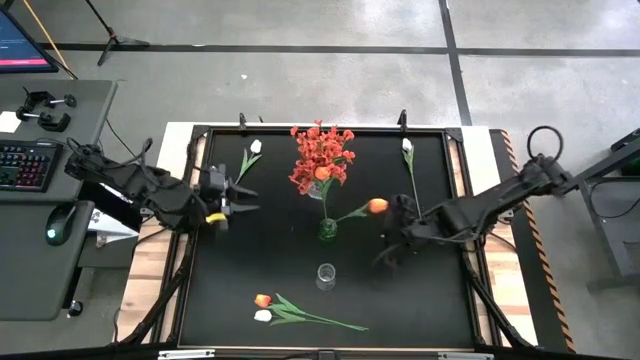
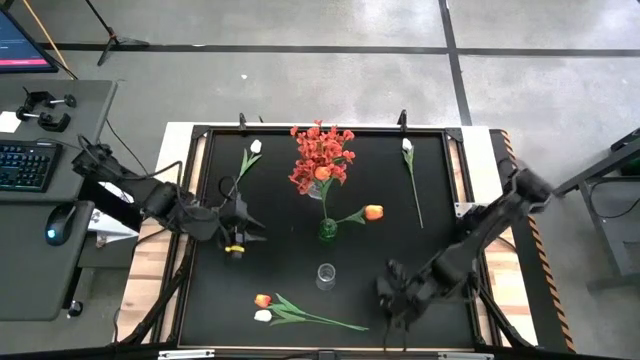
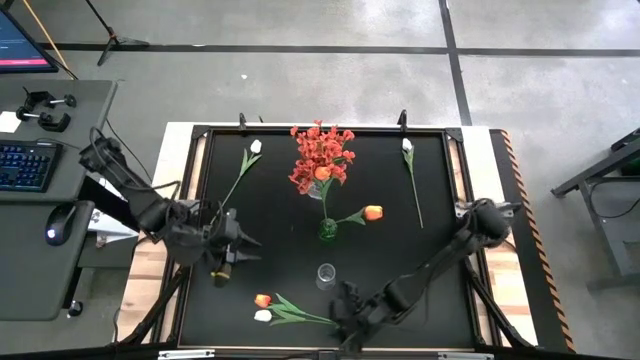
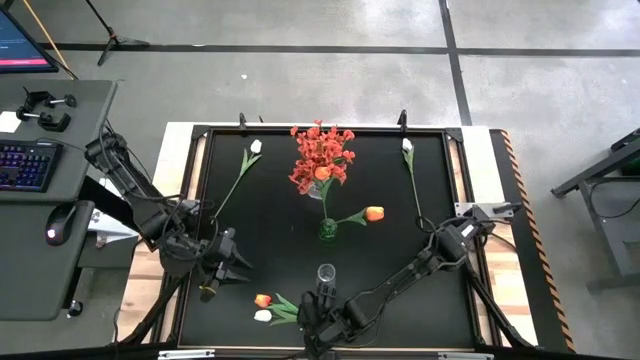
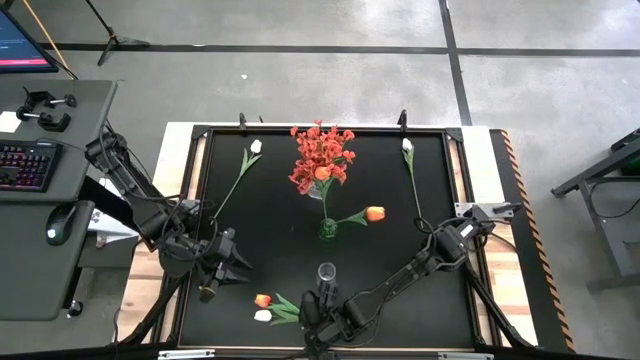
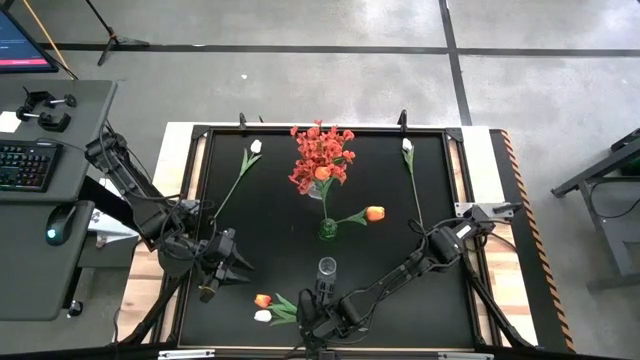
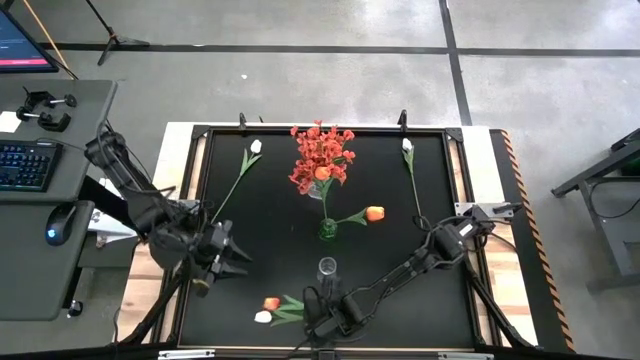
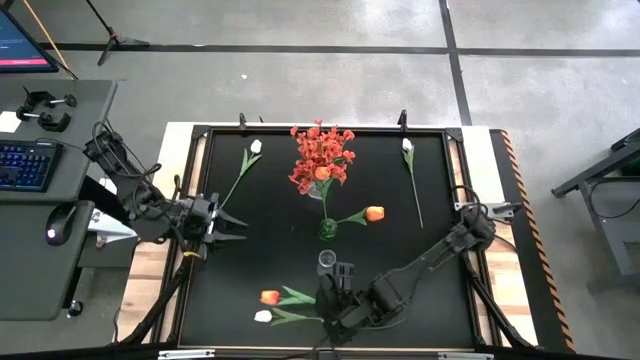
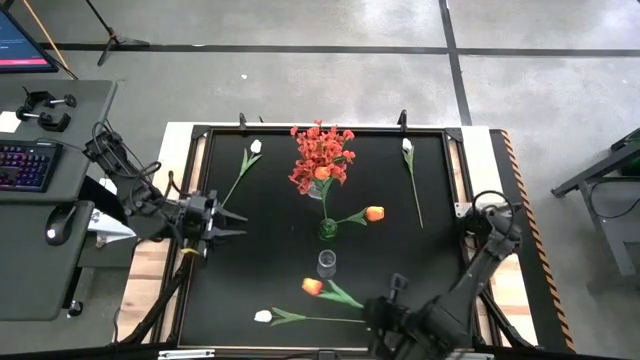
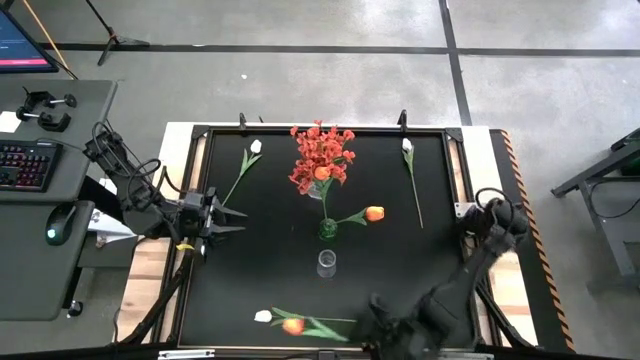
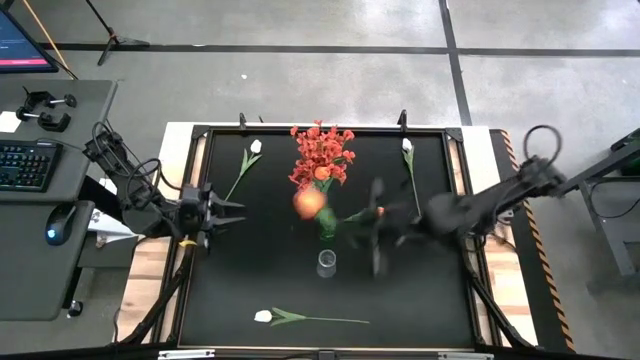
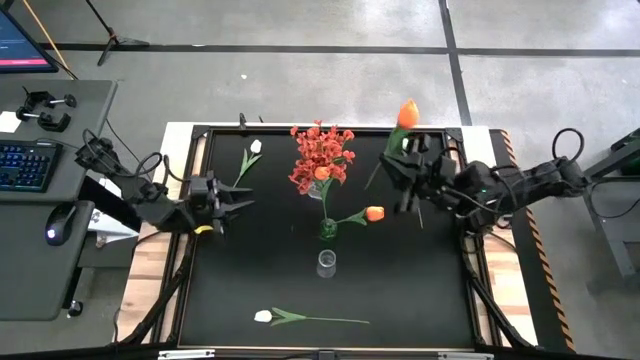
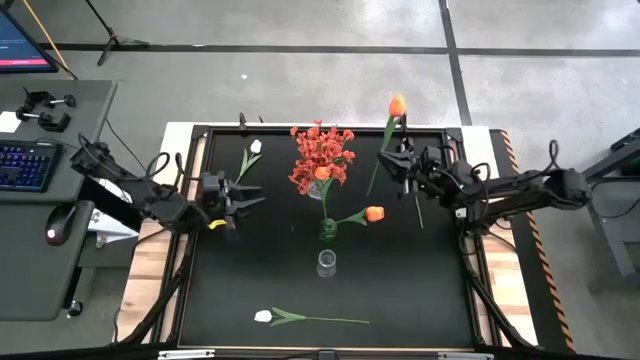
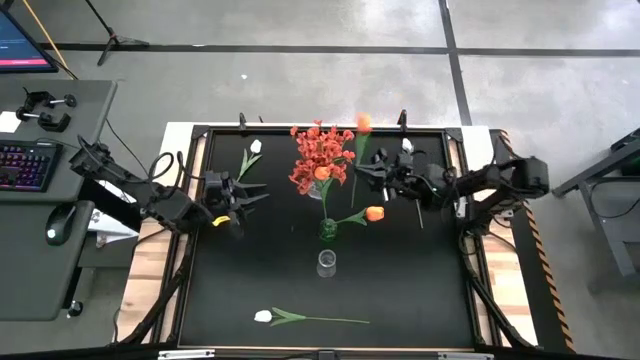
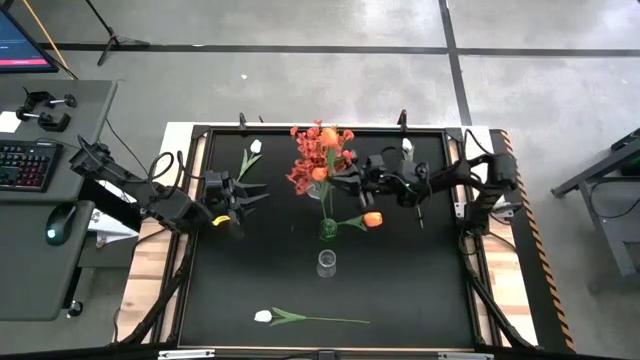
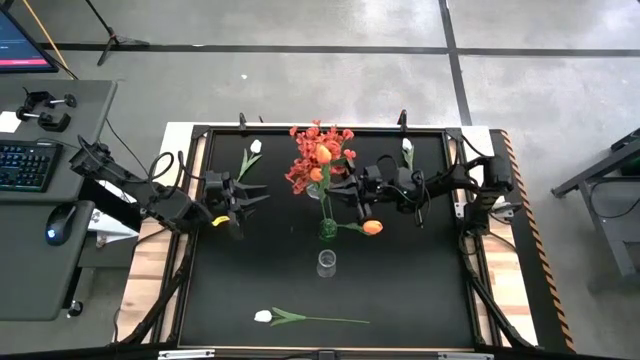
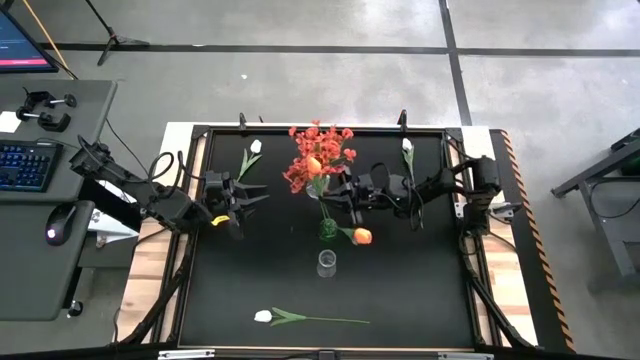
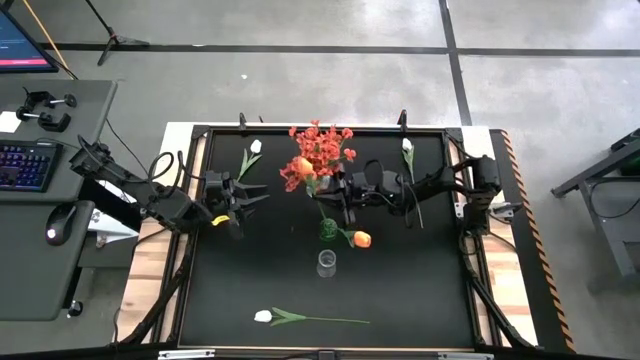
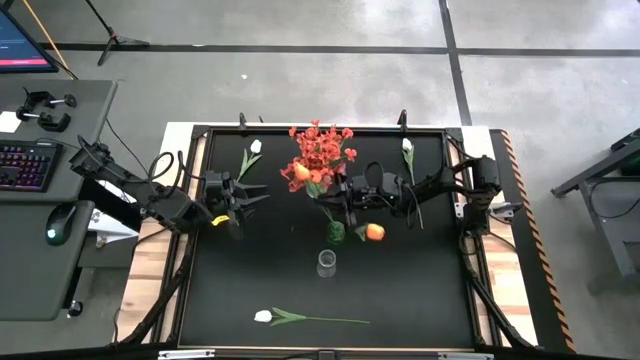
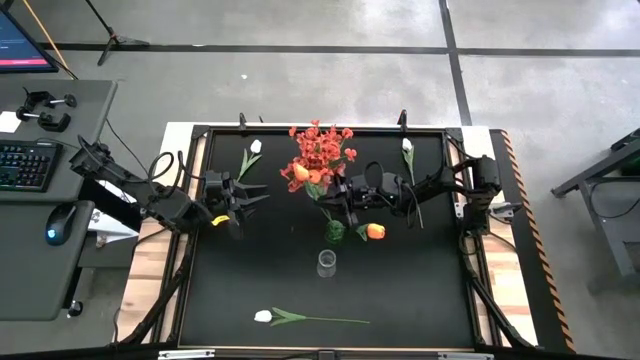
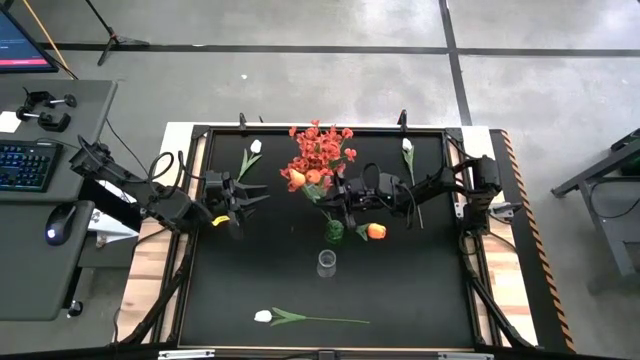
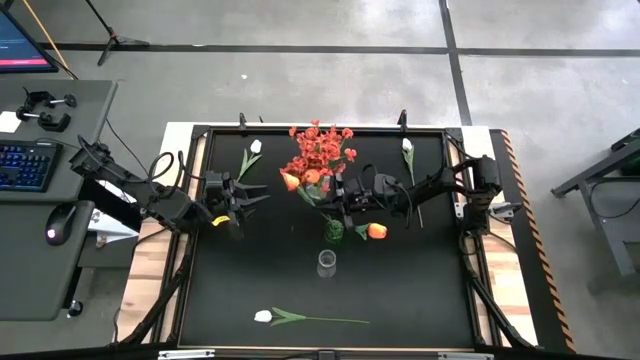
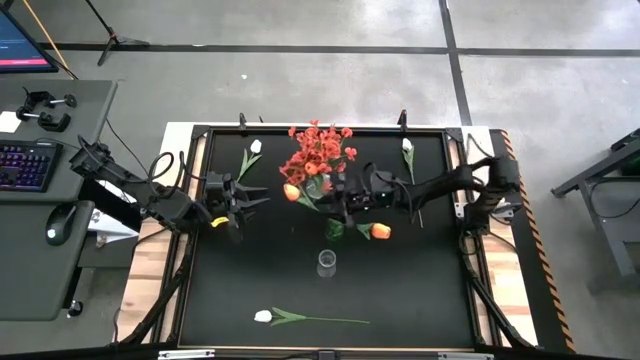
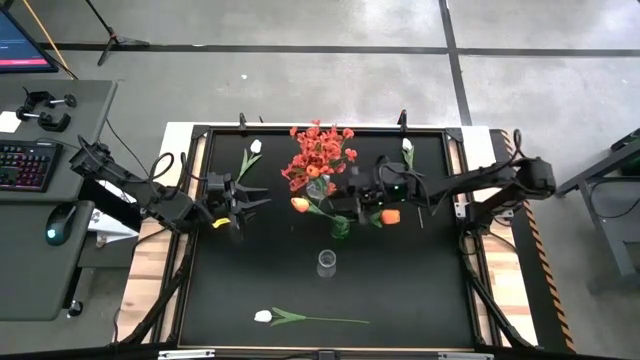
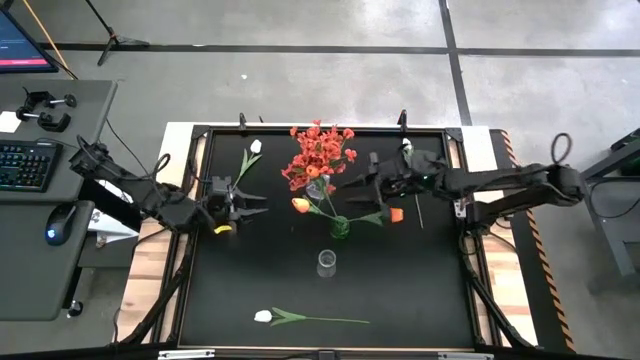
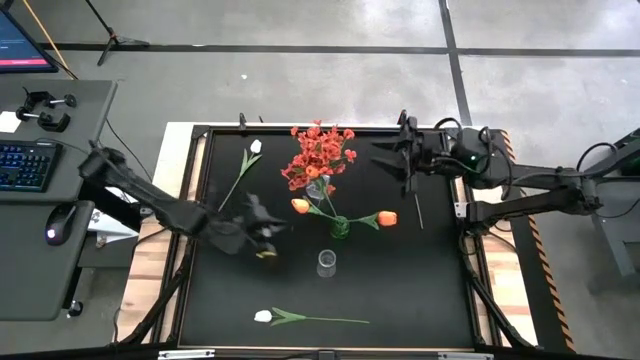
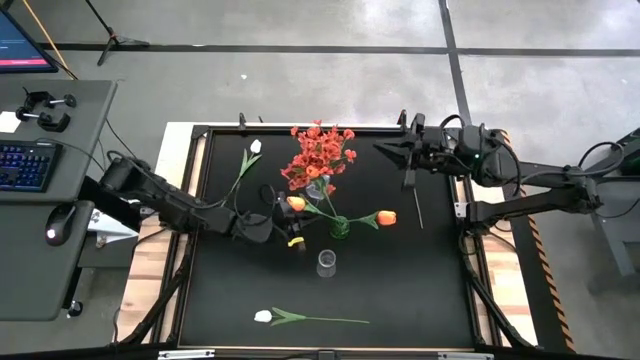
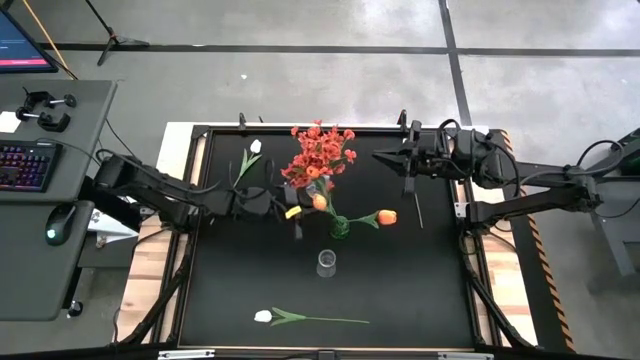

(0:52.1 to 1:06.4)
Task: Sort flowers into vase by color
Put the orange tulip into the green flower vase

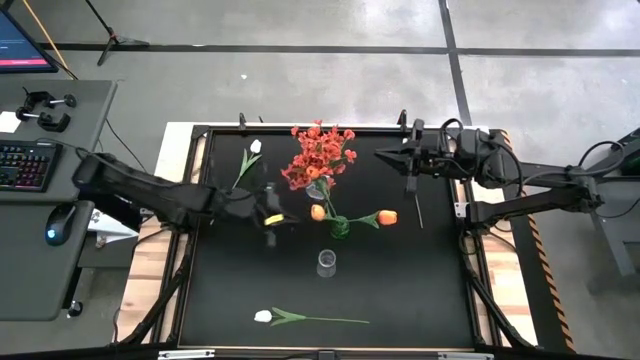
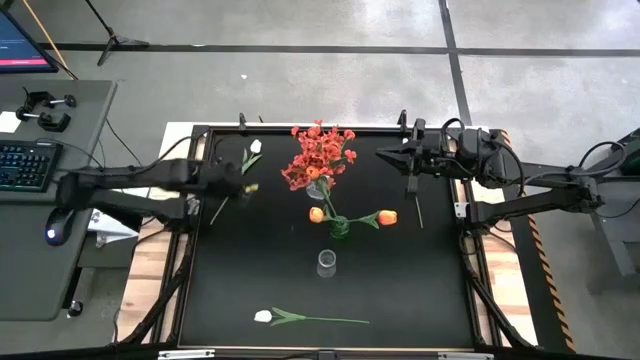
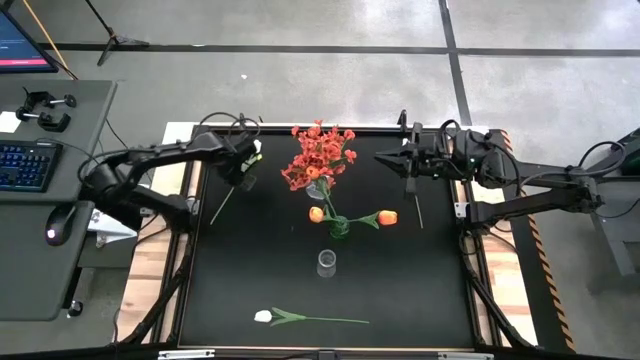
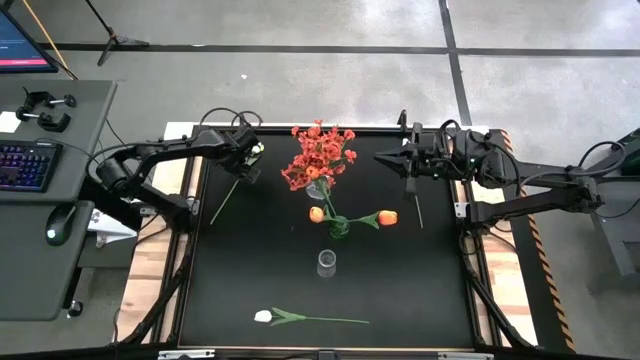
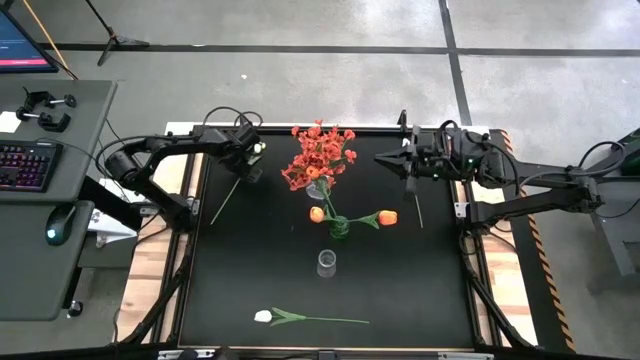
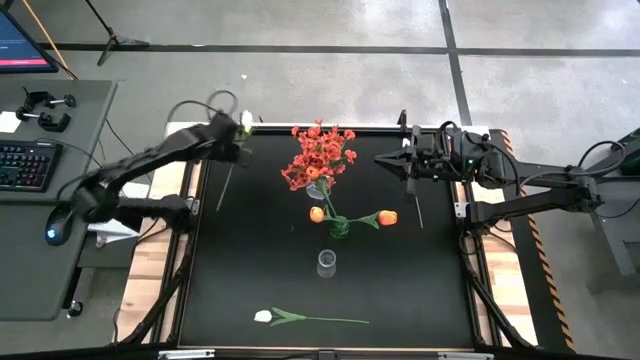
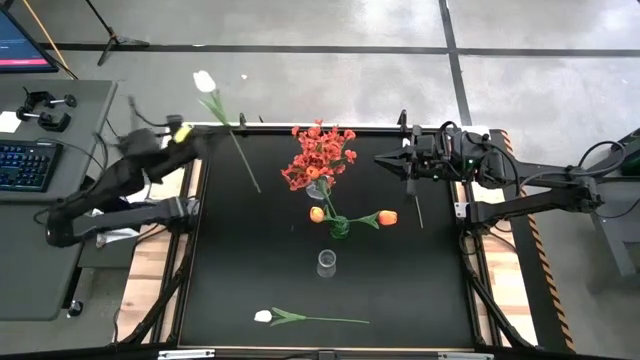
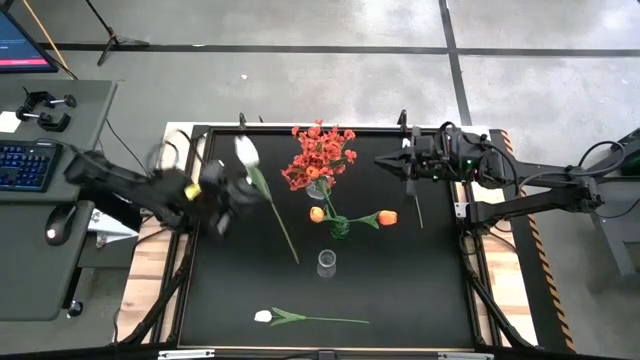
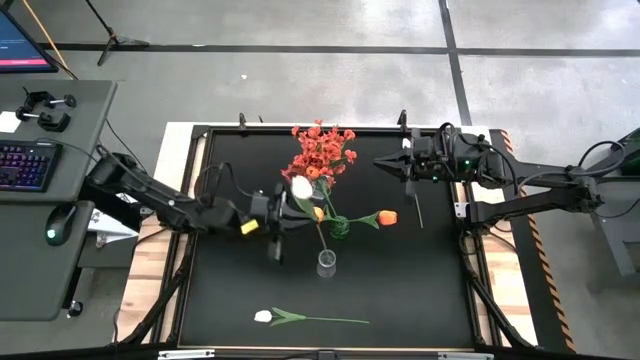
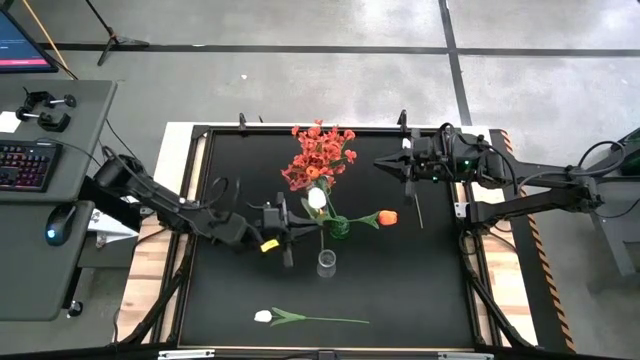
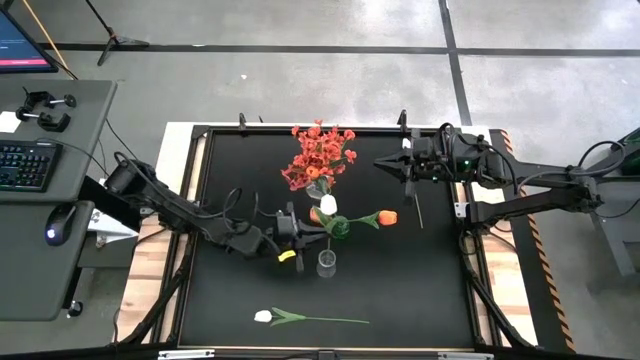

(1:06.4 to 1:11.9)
Put the top left white tulip into bottom transparent flower vase

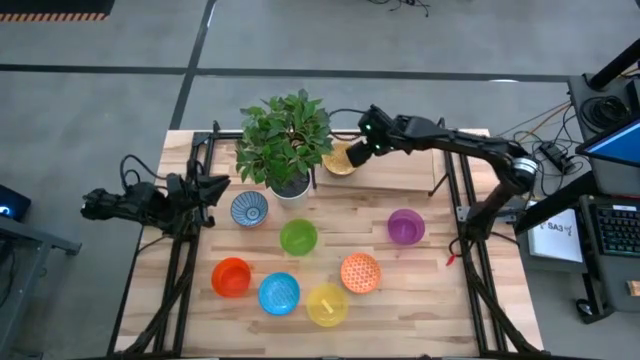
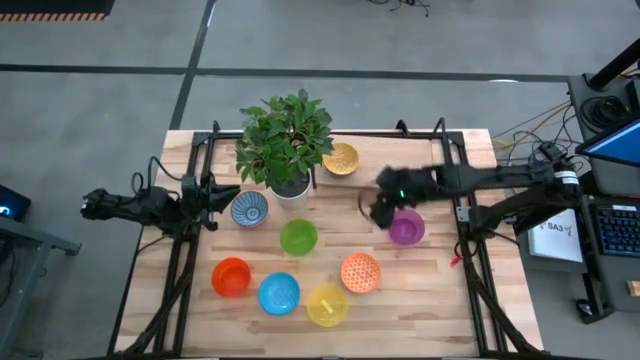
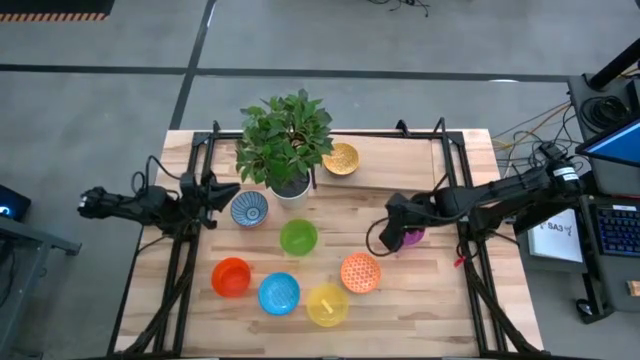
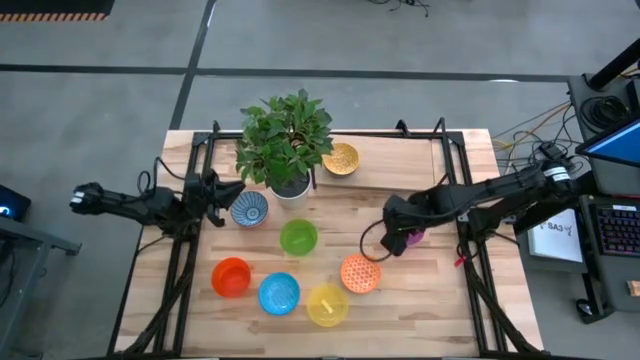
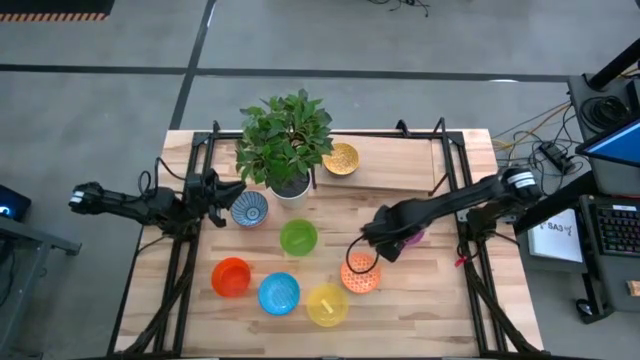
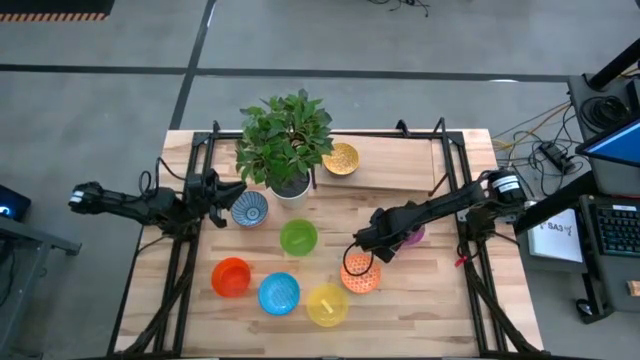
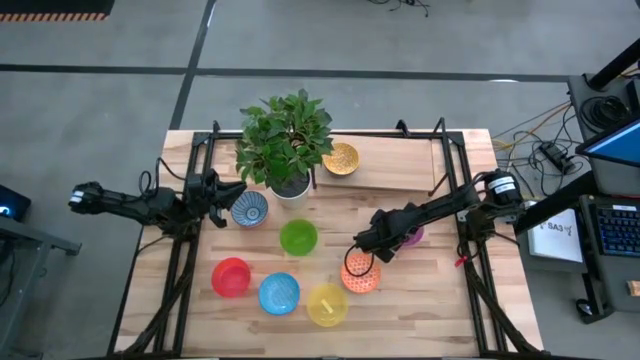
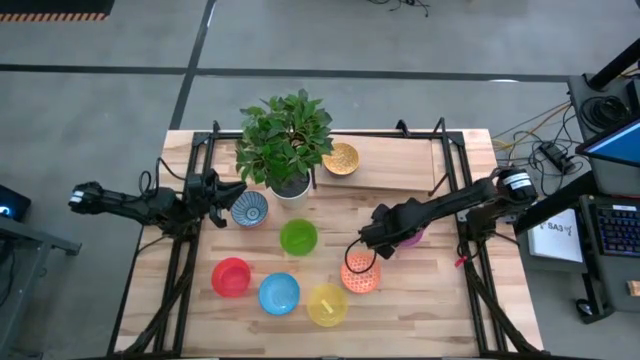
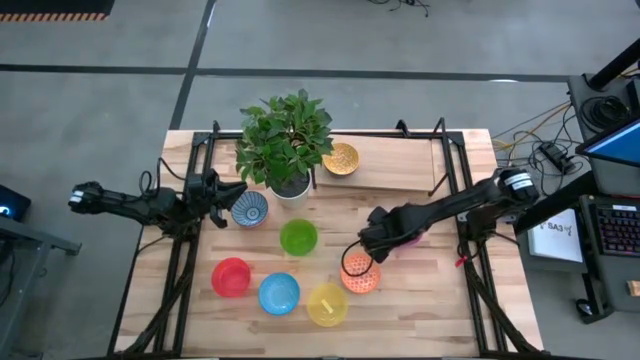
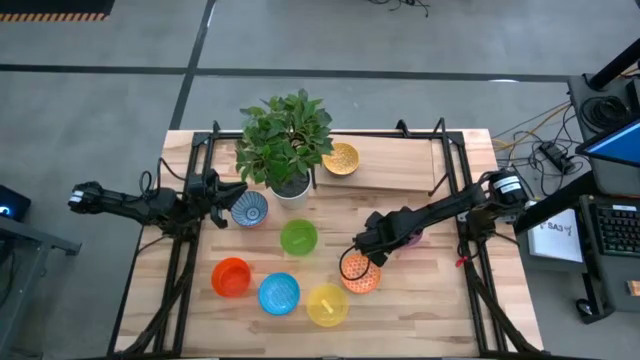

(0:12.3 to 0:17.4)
Task: Place and stack bowls onto a shelf
Put the purple bowl on the shelf
